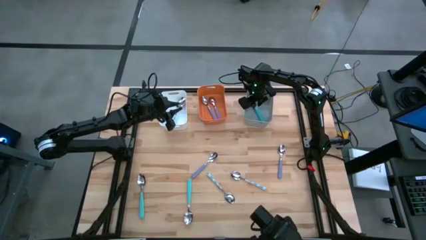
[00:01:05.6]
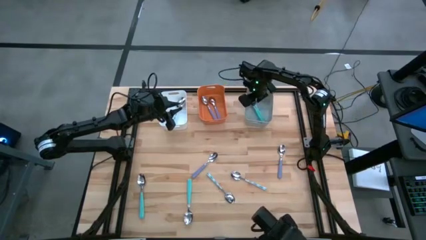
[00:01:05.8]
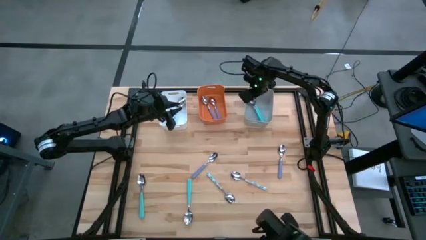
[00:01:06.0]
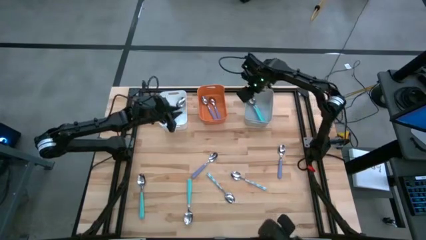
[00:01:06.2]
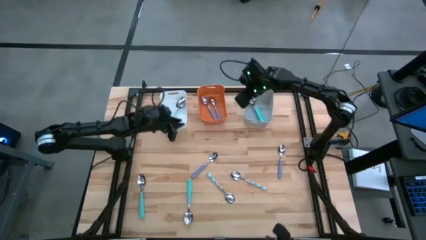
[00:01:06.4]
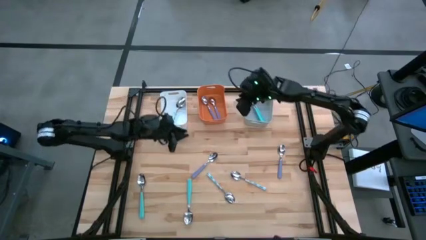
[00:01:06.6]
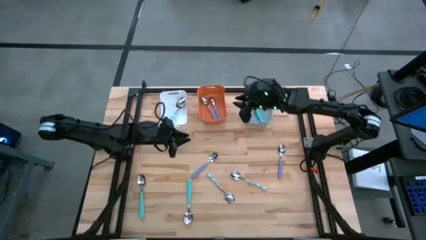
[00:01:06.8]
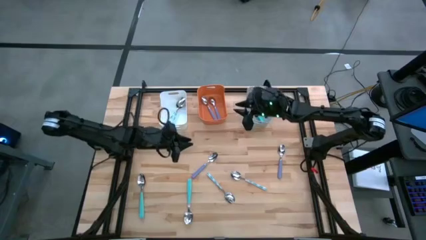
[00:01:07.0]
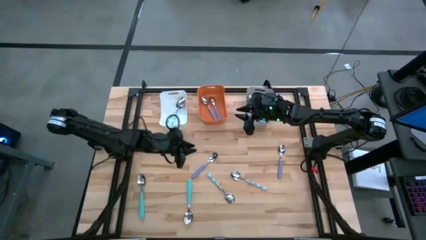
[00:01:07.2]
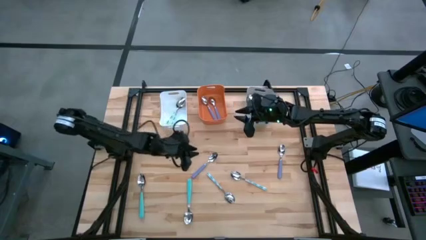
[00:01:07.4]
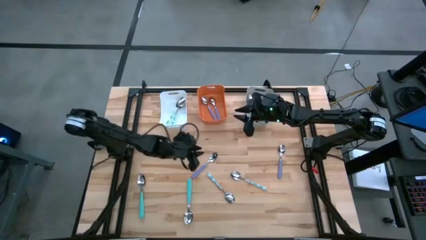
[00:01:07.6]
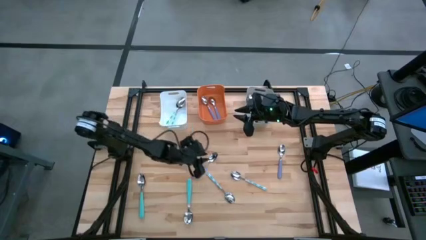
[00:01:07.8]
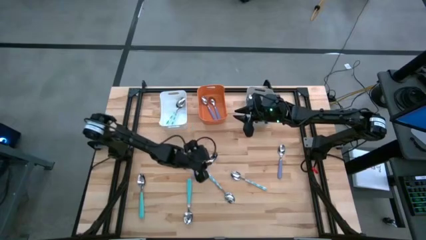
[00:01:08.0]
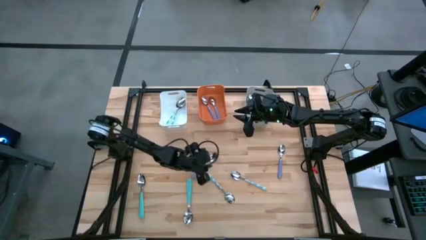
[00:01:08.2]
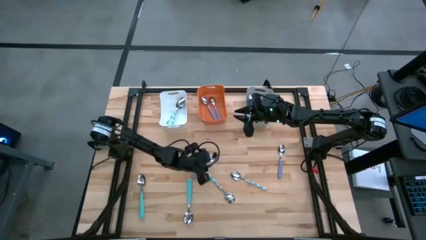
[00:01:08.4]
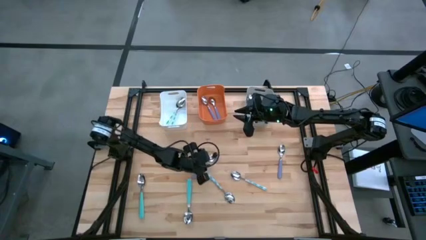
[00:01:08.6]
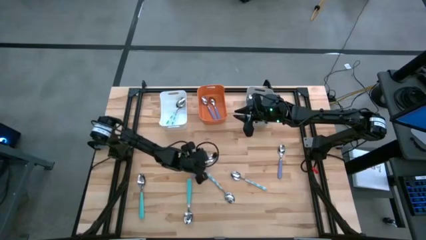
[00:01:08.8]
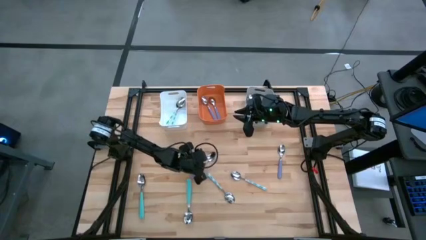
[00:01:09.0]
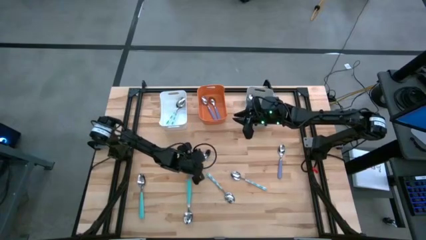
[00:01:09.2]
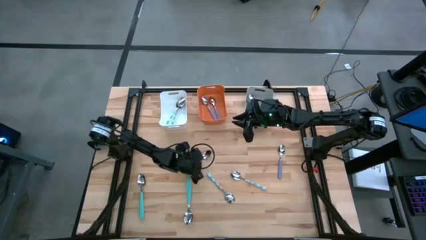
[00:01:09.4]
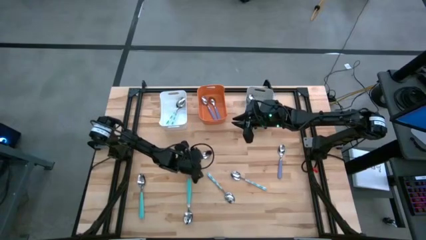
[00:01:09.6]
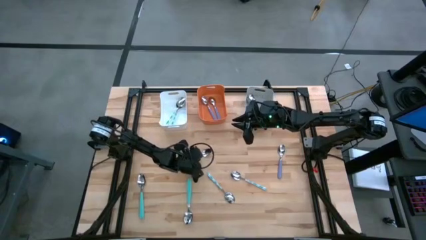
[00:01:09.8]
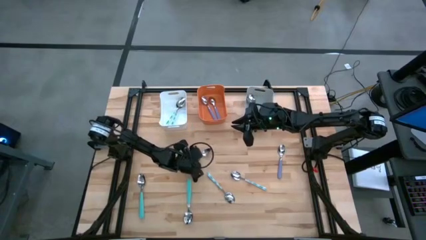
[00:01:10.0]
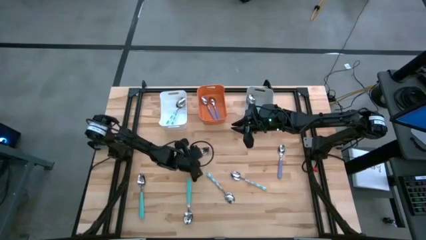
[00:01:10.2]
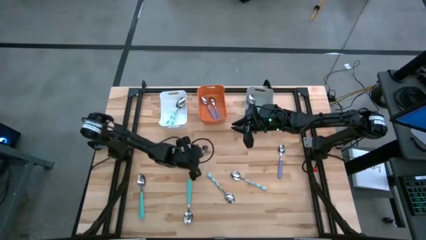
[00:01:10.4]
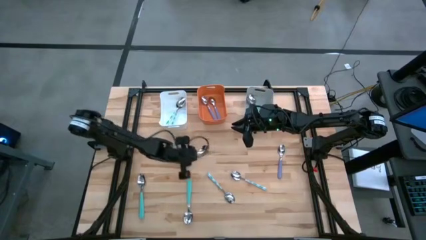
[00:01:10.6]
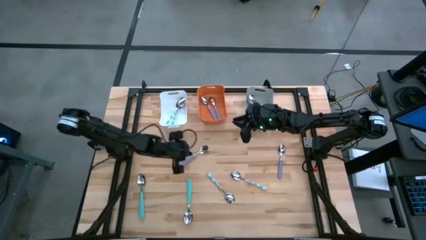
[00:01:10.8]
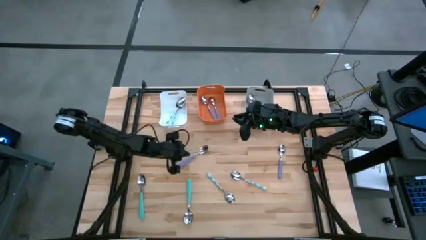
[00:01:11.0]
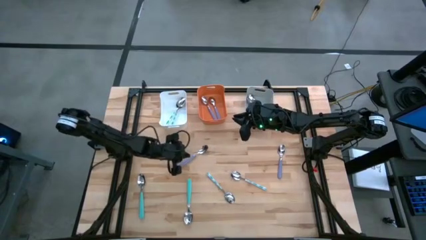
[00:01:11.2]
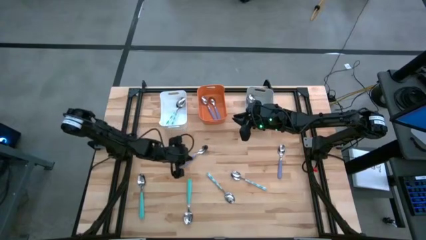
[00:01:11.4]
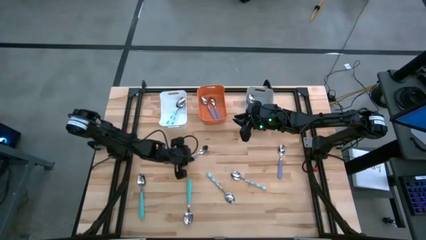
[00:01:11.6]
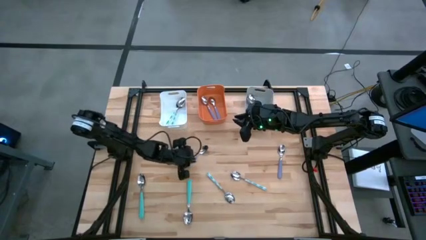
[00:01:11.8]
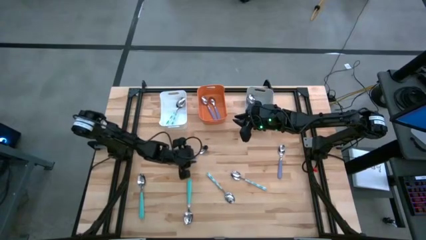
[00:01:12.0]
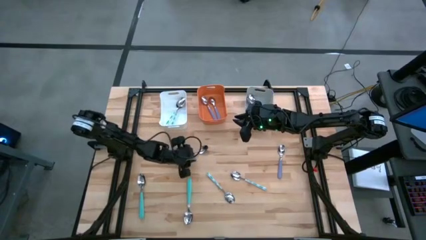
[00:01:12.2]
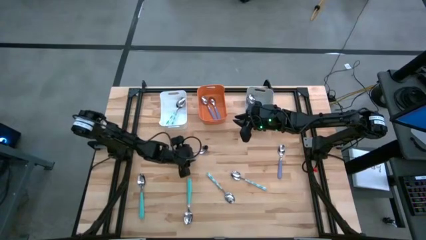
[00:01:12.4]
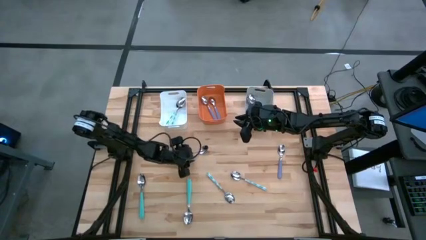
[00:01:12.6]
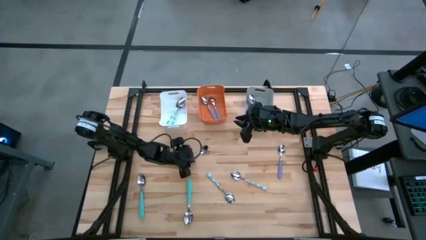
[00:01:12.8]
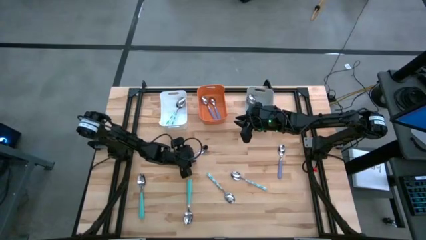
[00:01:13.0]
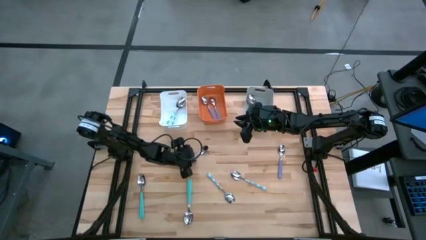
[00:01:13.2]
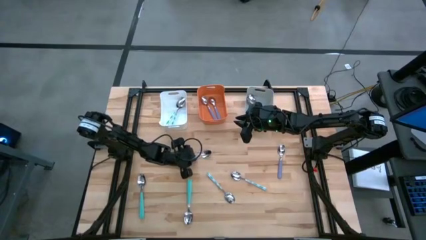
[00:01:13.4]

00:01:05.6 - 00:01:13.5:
Task: Sort silverware by color (type)
Put the purple spoon into the orange bin

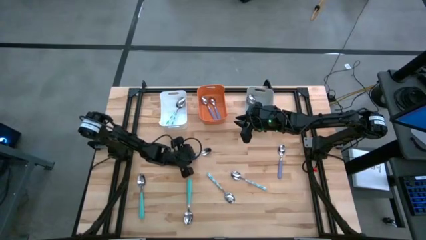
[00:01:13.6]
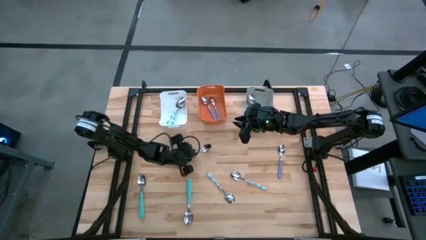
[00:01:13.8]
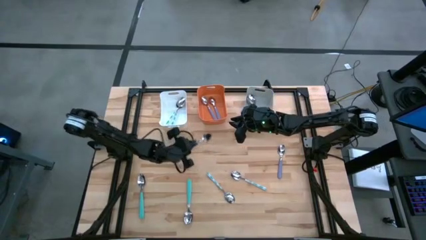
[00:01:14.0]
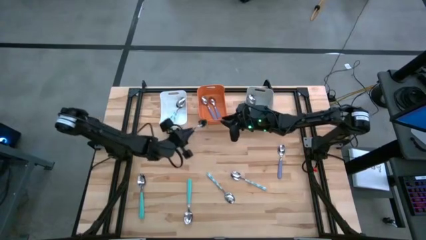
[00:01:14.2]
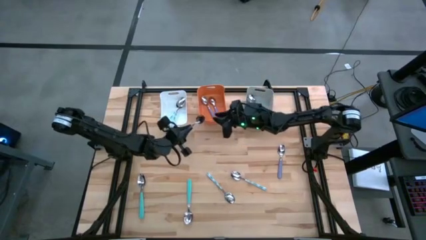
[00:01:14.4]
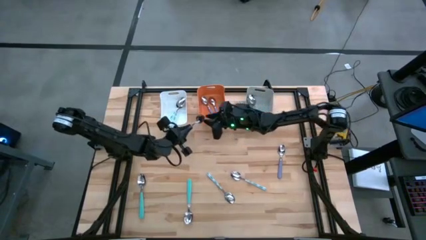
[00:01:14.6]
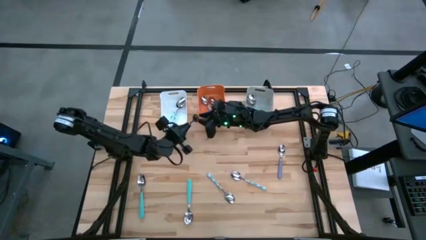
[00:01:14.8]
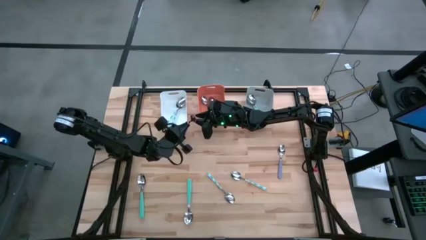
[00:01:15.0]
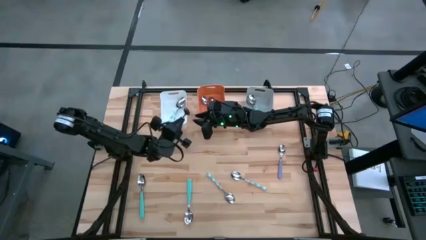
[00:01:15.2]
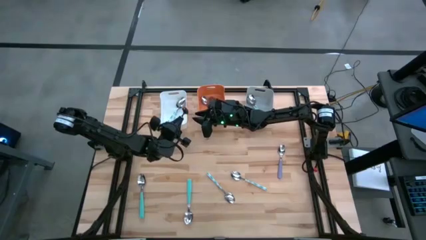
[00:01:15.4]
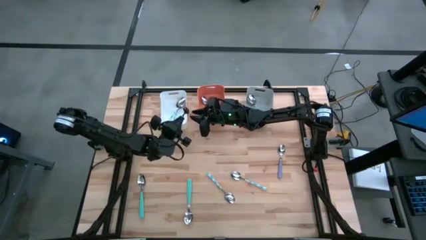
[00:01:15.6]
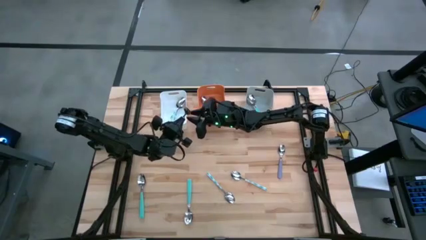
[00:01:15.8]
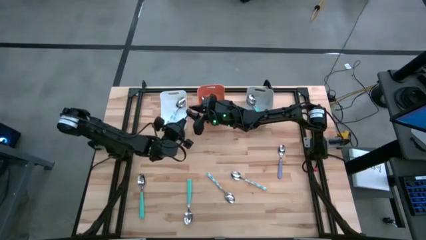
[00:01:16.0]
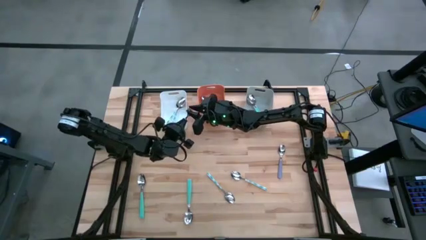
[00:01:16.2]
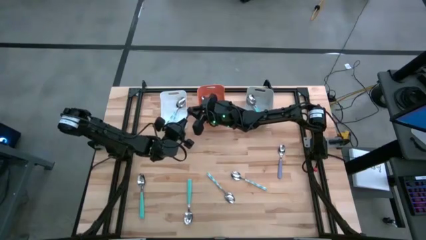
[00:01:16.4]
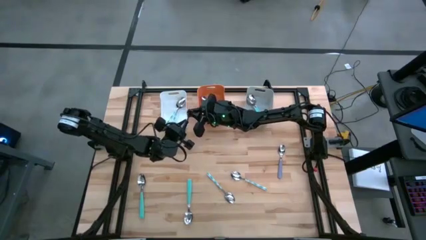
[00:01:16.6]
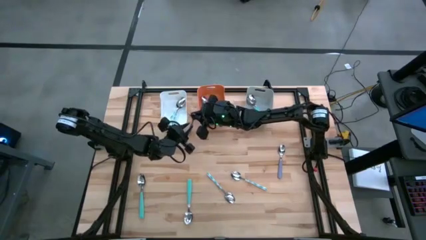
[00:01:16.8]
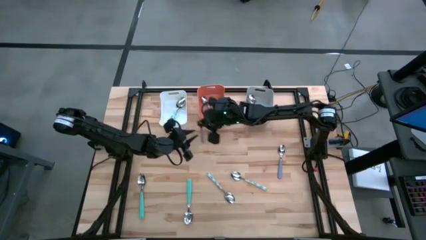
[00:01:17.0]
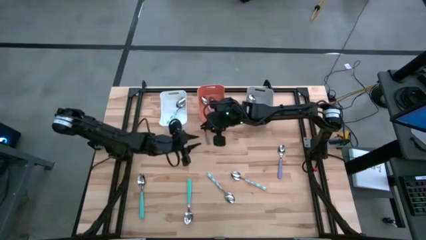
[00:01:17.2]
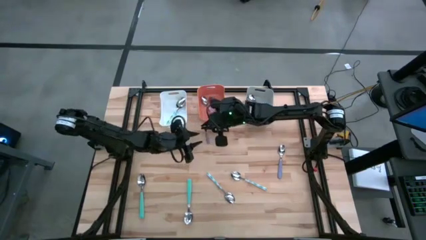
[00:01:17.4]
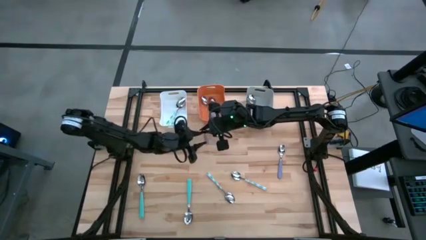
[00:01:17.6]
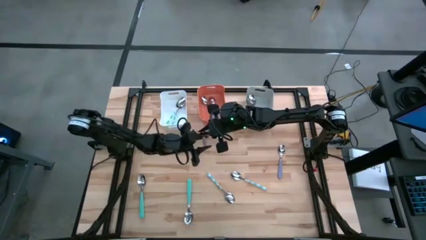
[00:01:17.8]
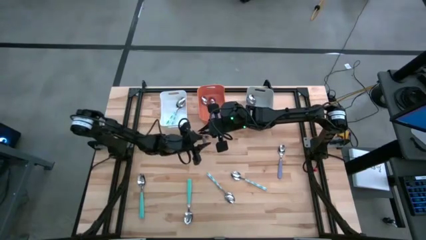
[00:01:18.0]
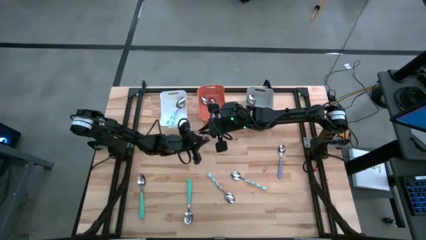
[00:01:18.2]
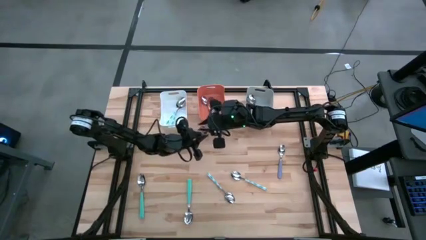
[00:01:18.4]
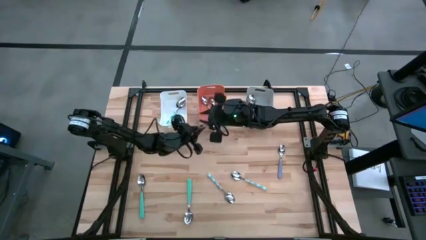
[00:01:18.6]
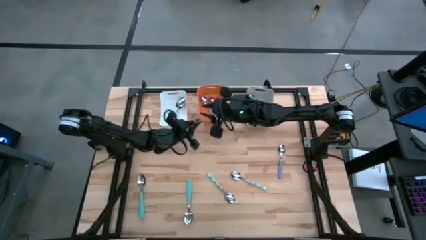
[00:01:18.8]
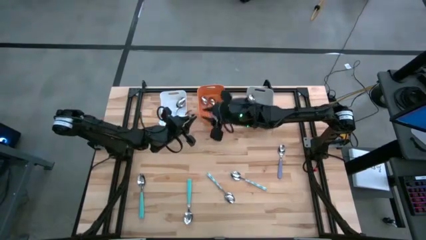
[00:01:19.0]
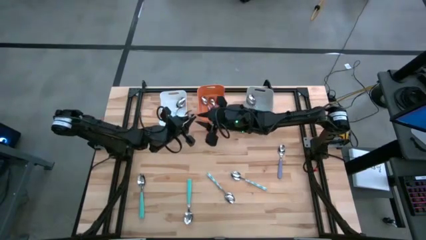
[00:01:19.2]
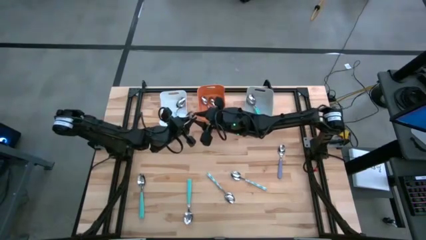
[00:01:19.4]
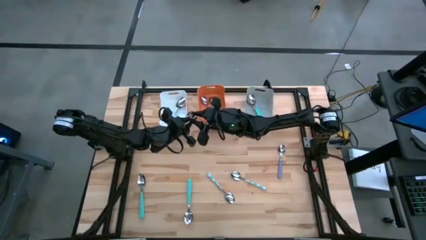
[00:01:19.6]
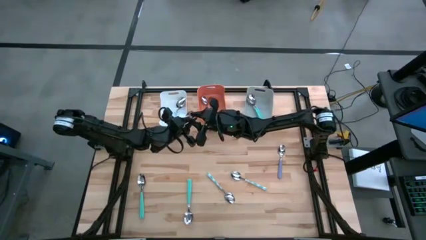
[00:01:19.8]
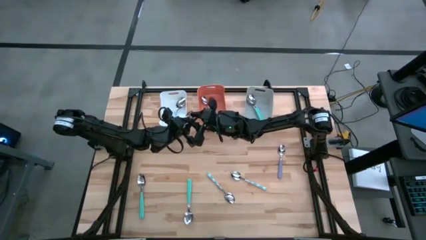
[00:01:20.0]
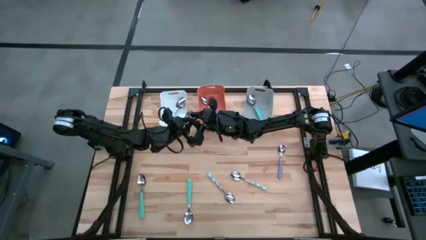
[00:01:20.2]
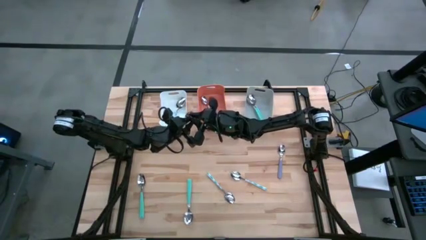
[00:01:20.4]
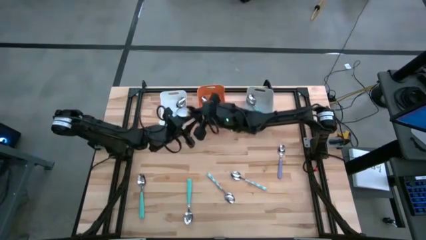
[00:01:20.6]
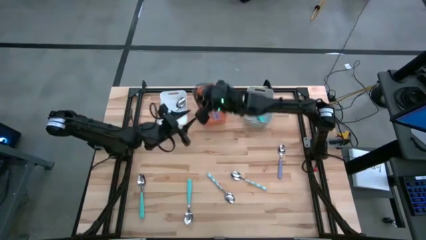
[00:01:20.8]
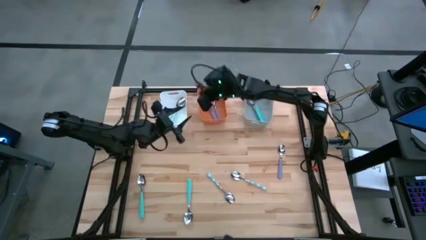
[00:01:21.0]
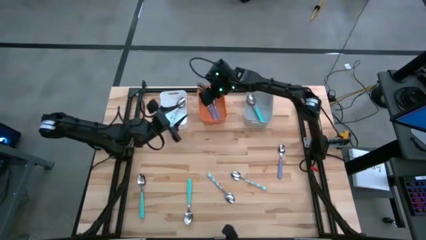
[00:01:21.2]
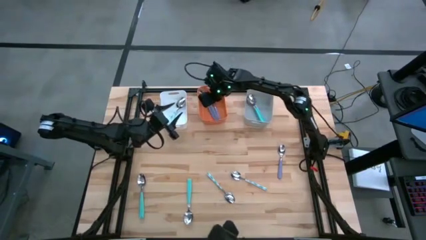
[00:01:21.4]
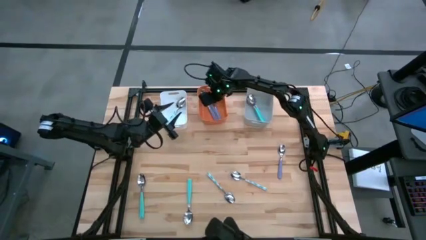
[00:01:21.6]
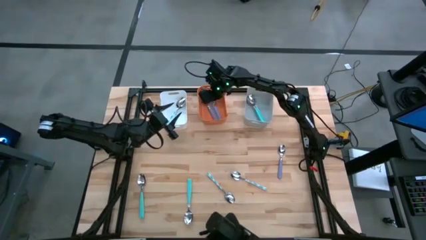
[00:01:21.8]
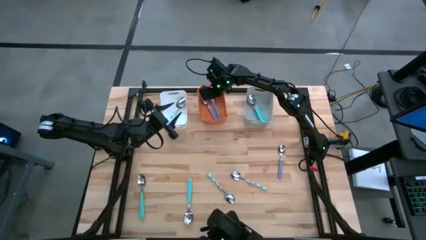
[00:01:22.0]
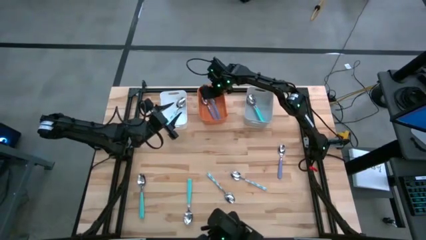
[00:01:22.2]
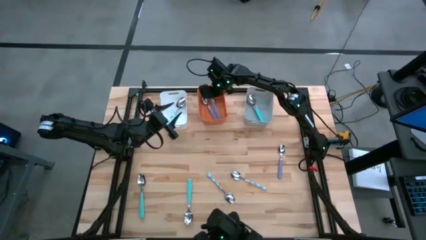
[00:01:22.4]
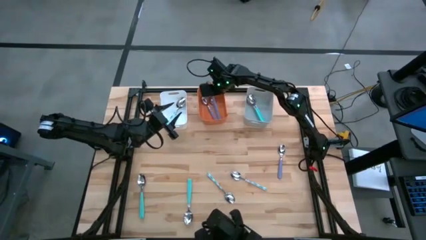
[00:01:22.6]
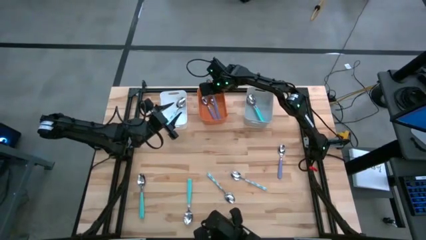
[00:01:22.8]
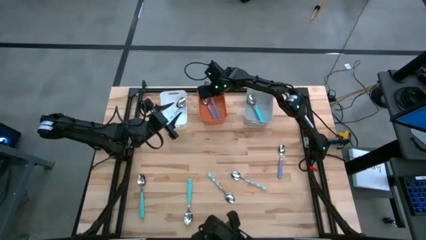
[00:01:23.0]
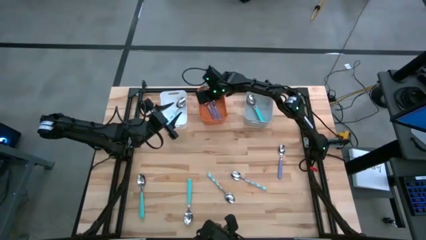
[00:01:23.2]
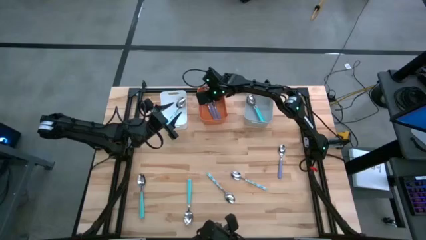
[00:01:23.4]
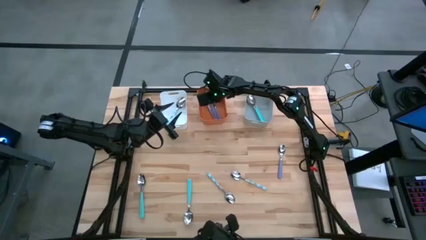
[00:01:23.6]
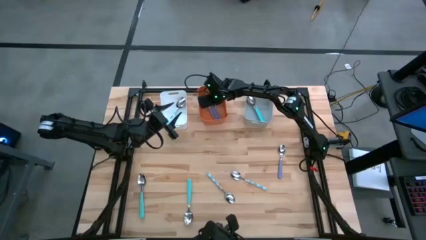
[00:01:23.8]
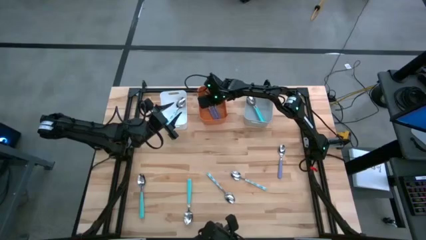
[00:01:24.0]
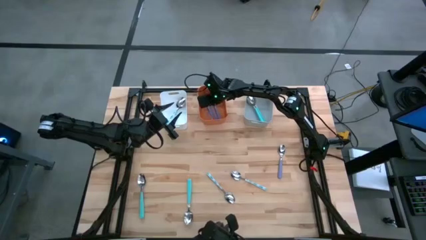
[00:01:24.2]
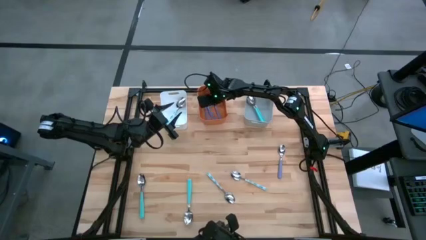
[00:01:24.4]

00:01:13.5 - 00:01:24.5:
Put the purple spoon into the orange bin
